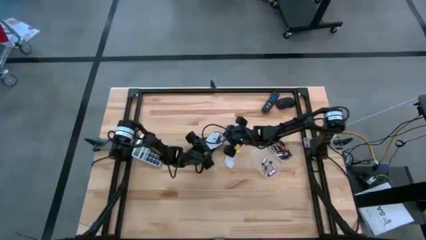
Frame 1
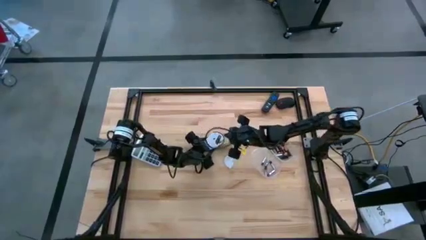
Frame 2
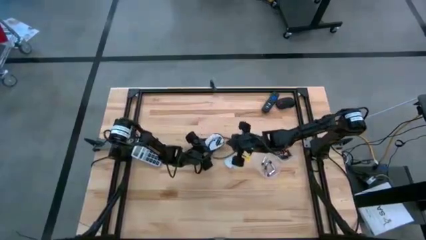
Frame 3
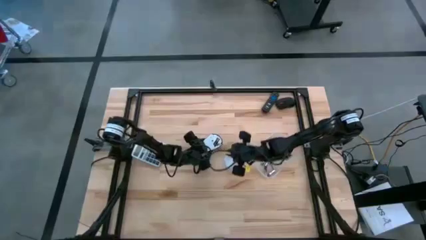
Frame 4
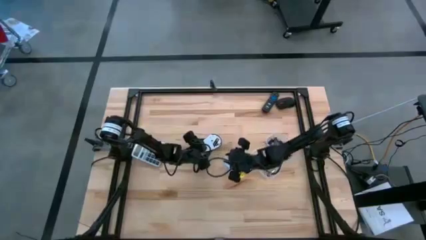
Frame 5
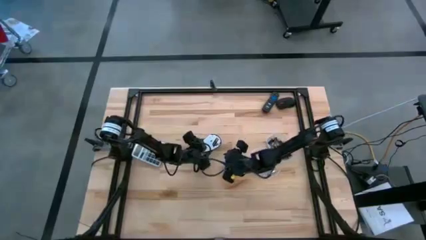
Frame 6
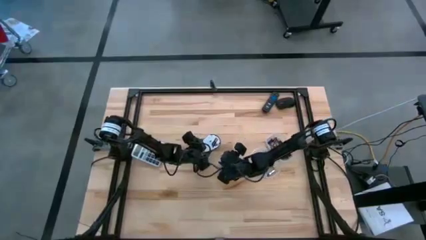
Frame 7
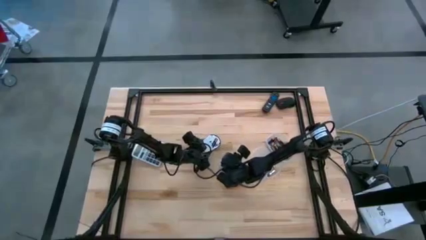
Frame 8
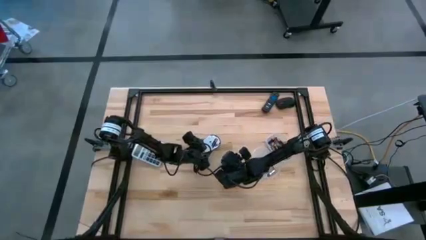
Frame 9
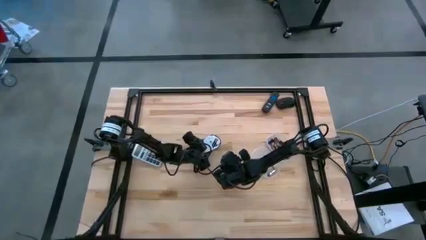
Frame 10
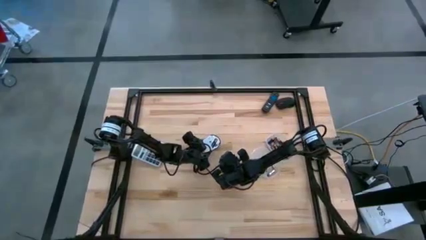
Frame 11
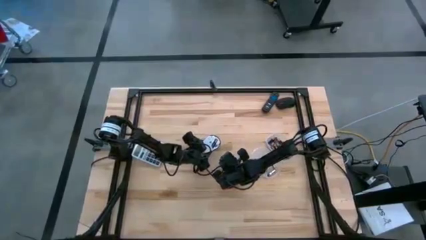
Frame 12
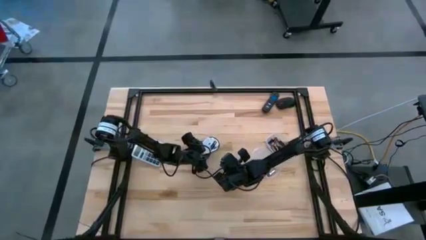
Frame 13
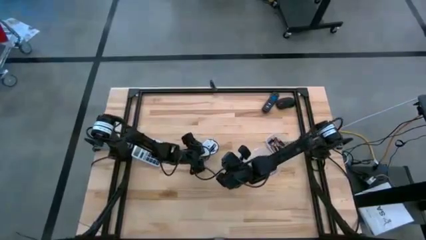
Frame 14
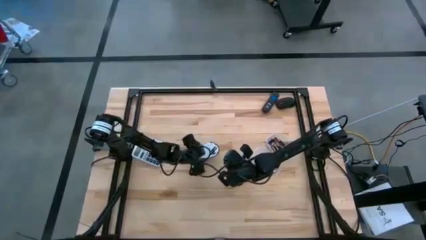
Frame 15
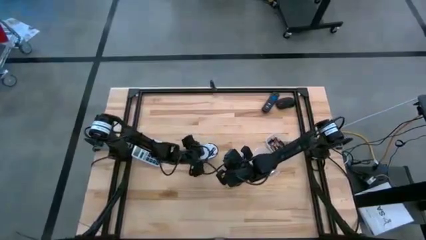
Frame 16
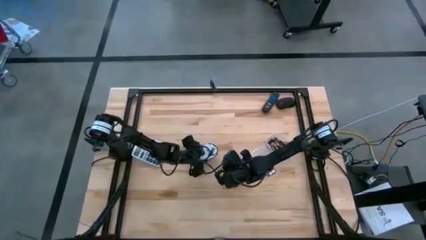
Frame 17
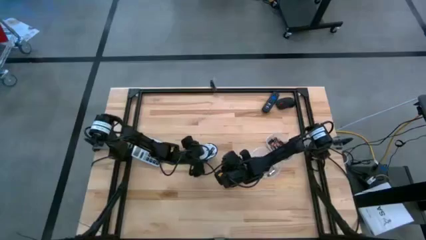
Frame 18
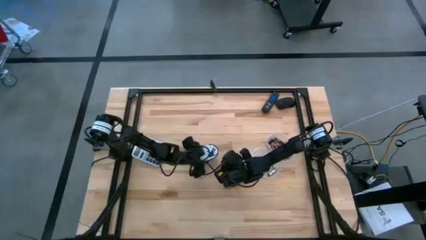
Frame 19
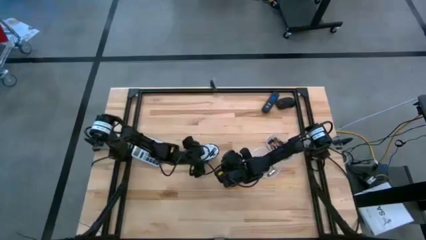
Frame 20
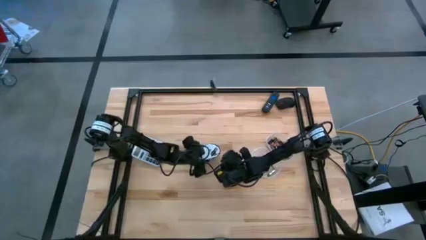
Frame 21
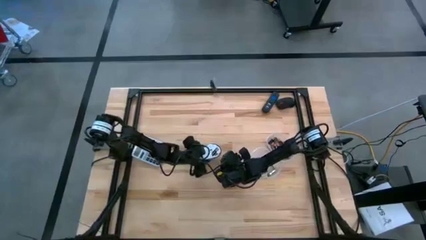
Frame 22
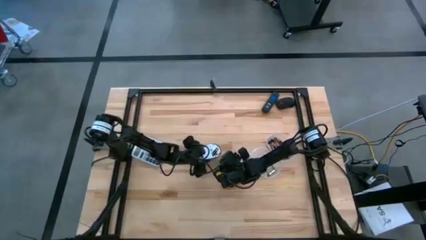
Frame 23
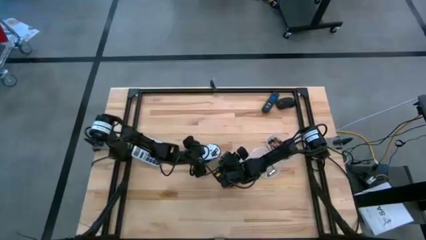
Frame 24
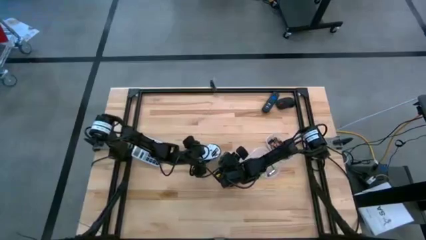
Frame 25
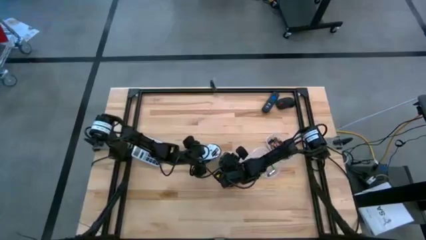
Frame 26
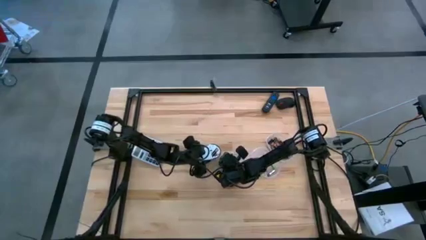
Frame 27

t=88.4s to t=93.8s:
Task: Insert battery
Close the black/white mouse battery compartment

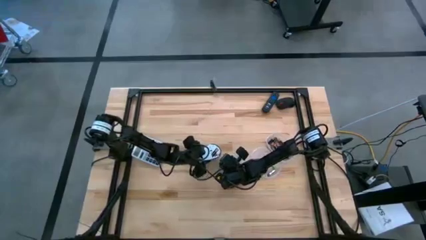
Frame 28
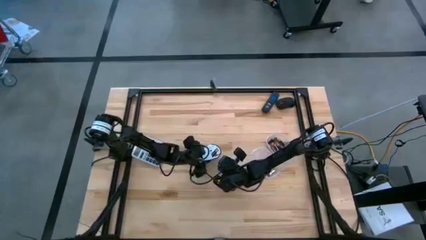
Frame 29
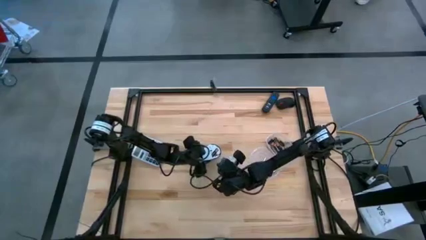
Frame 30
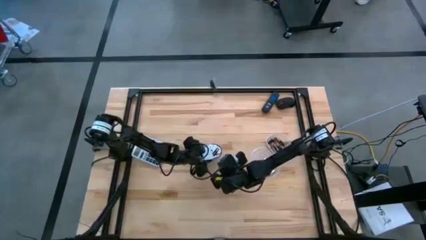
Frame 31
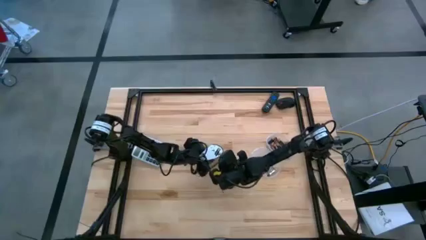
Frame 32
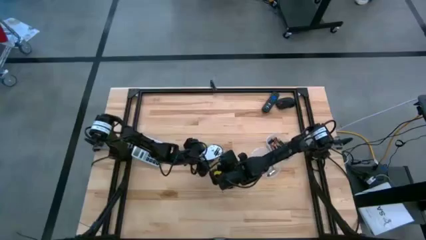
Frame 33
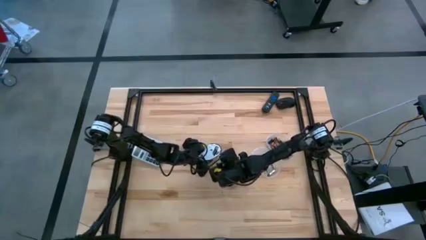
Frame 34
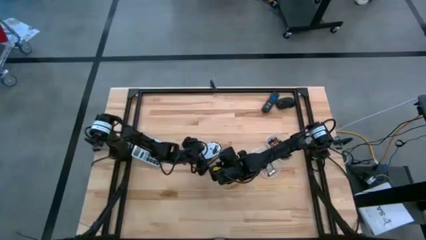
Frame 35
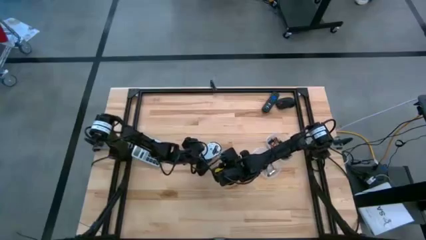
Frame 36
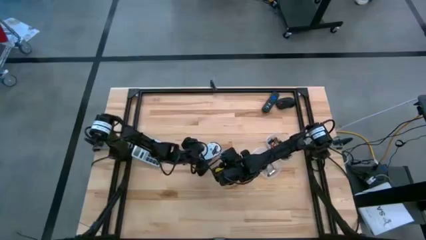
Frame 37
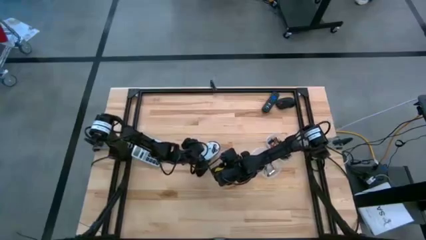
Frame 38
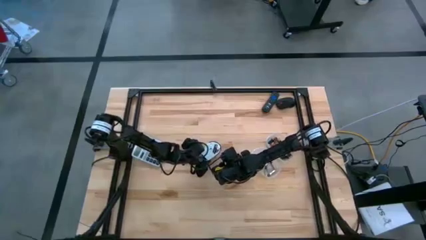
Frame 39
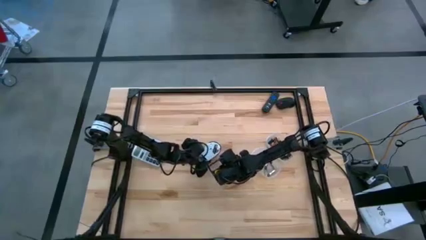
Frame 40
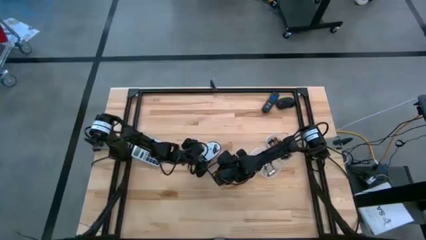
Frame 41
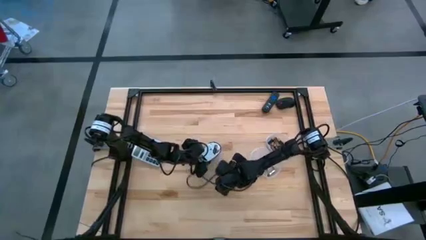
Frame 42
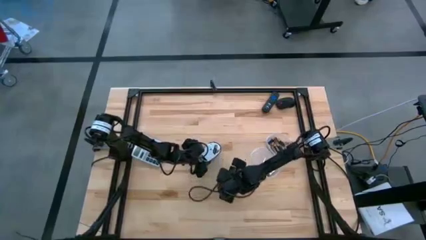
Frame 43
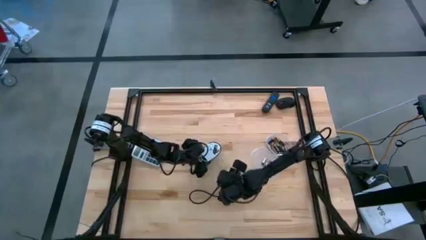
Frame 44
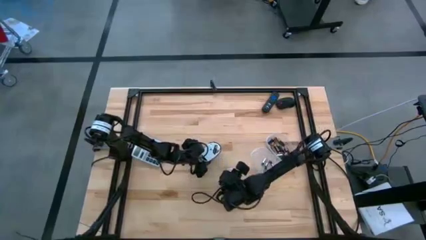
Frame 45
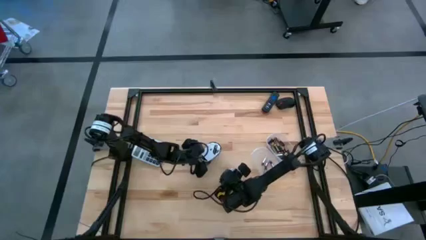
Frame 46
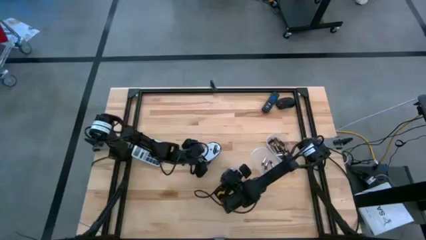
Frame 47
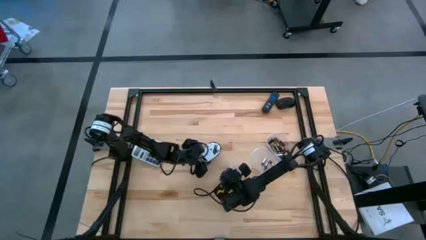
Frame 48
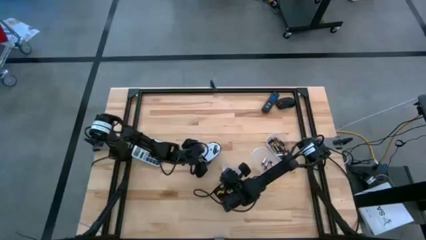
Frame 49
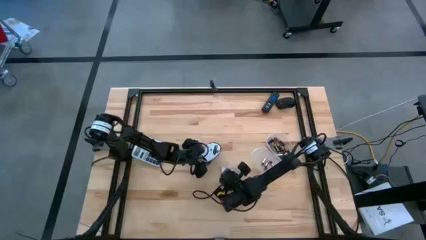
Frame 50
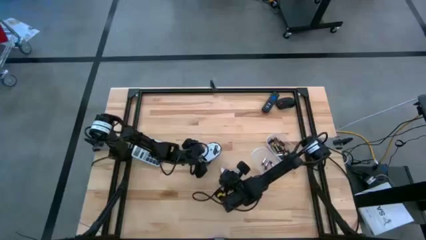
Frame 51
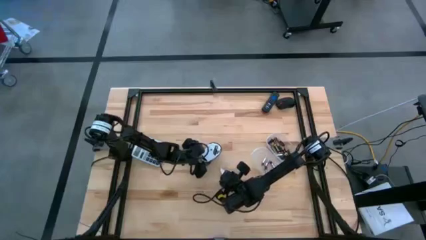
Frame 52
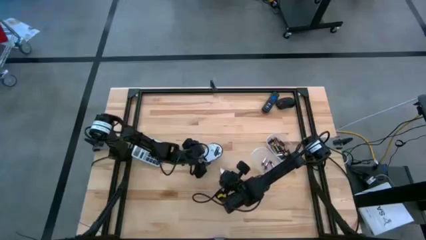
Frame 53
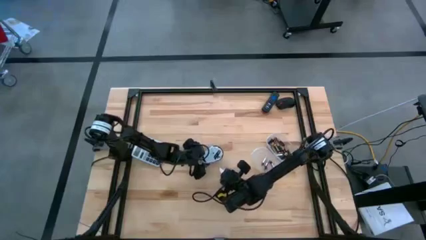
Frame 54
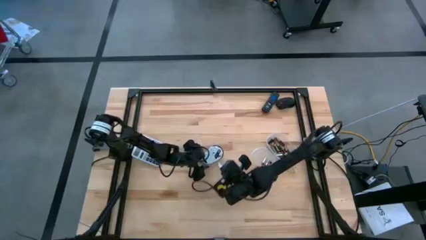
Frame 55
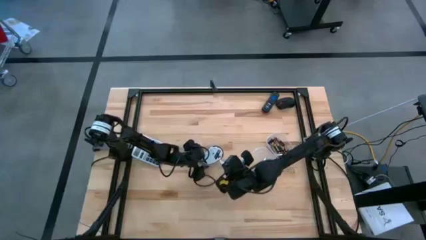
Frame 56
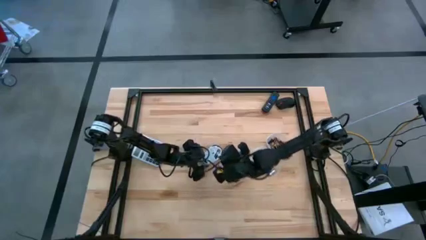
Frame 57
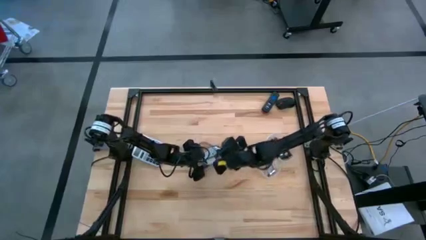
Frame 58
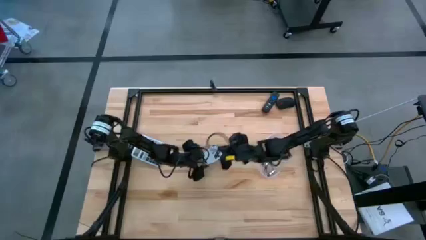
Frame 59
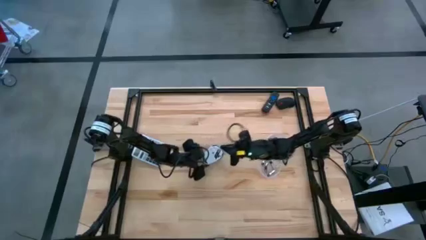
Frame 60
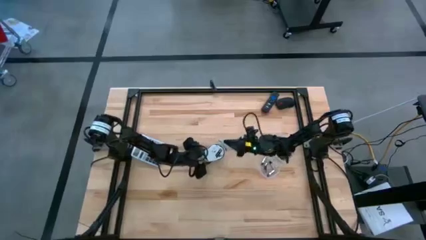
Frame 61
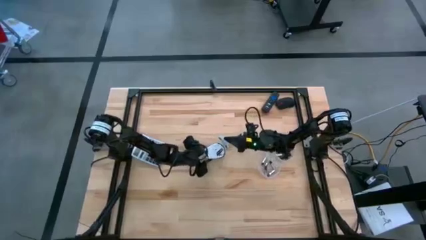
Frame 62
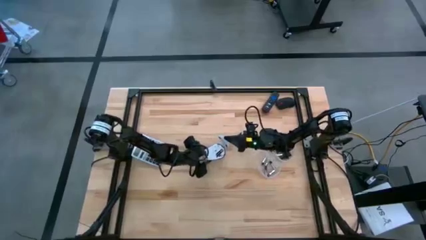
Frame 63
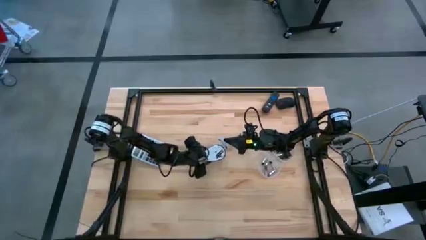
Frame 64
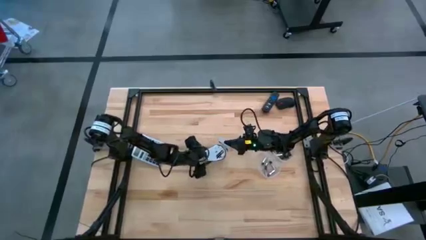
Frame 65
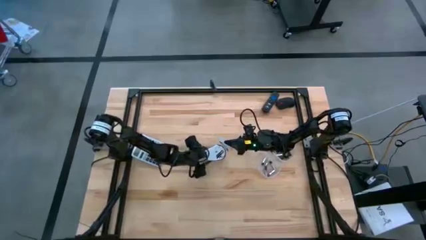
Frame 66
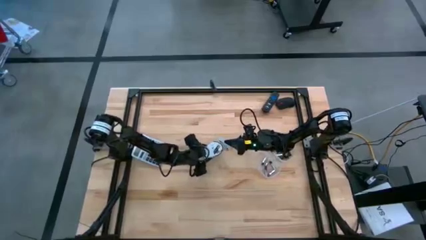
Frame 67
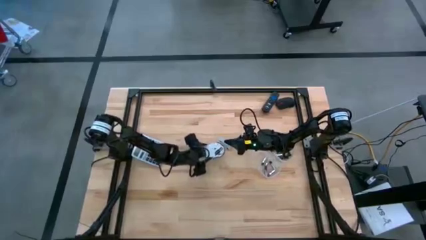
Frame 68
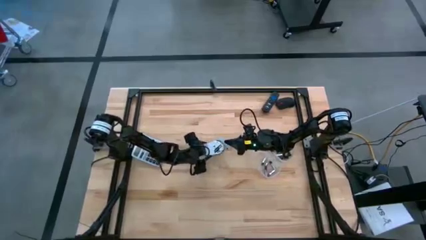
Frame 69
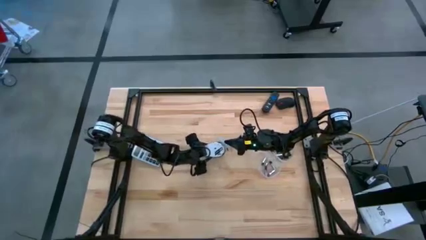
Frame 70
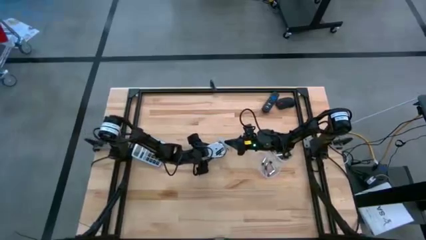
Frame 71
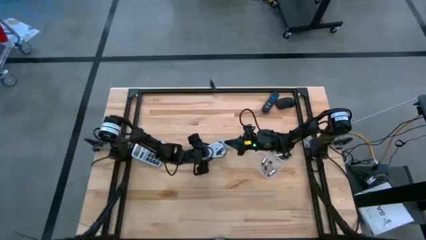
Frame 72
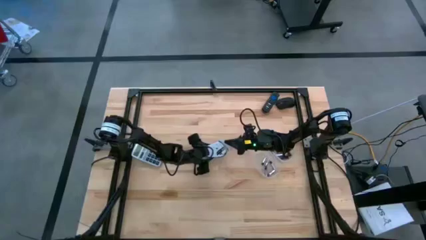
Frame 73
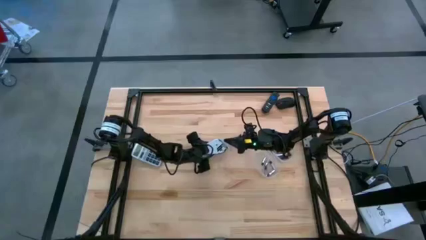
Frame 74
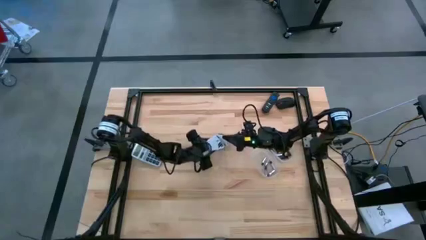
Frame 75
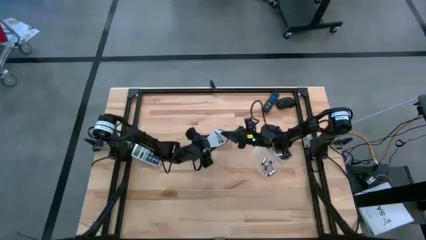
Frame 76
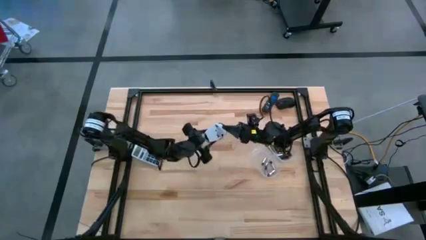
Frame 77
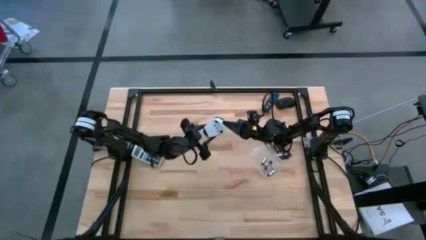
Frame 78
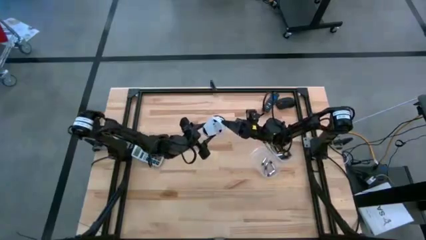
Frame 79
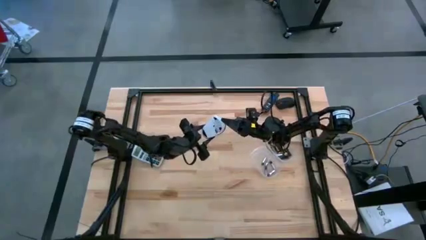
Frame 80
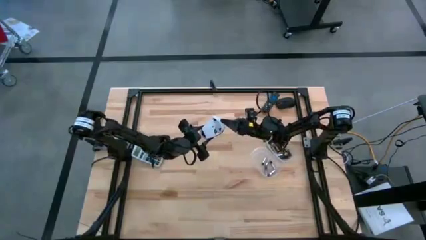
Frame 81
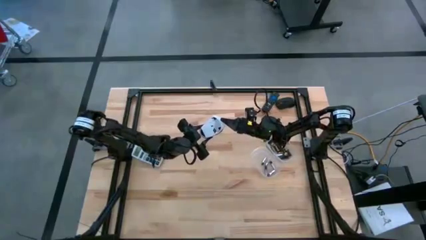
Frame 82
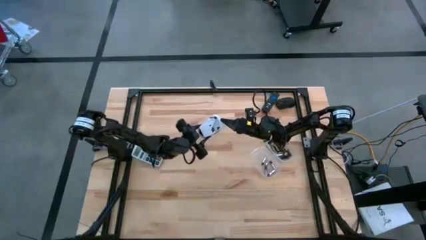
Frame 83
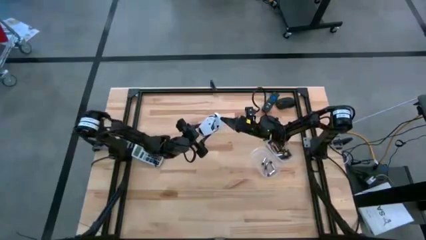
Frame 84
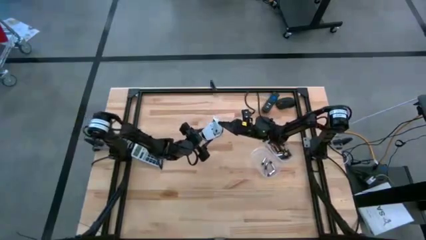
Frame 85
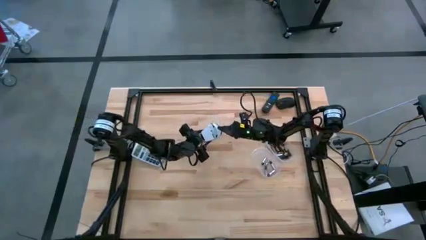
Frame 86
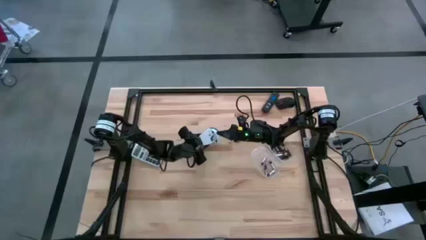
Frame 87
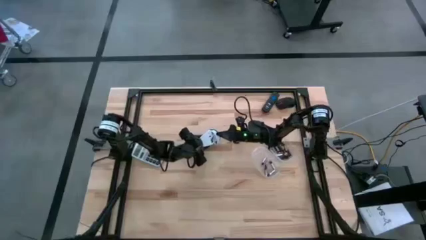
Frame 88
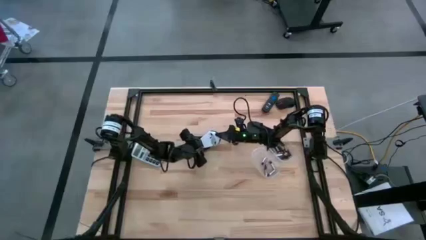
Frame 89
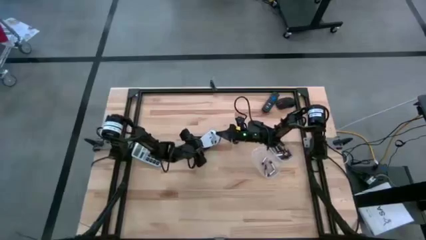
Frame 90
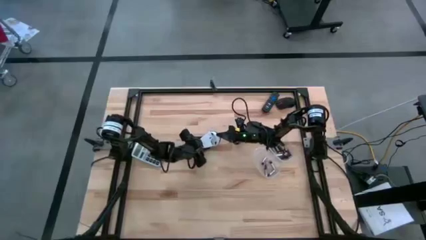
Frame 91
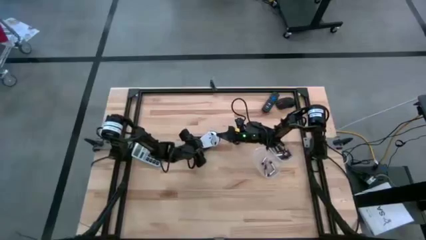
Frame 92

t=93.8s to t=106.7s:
Close the black/white mouse battery compartment
